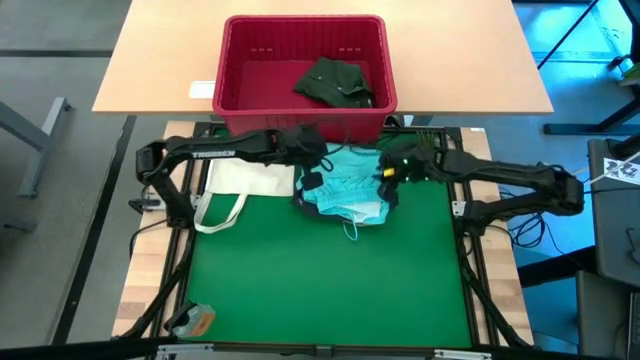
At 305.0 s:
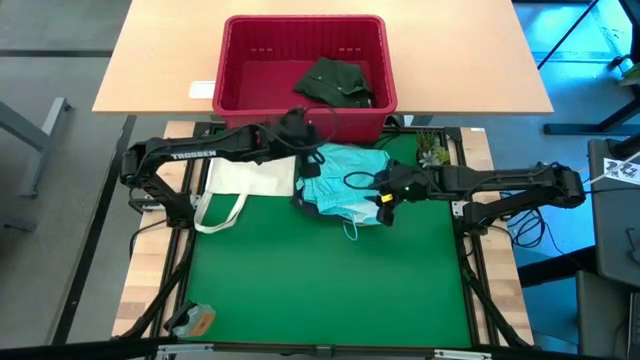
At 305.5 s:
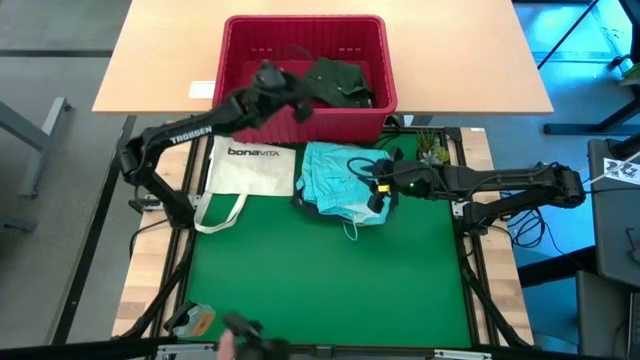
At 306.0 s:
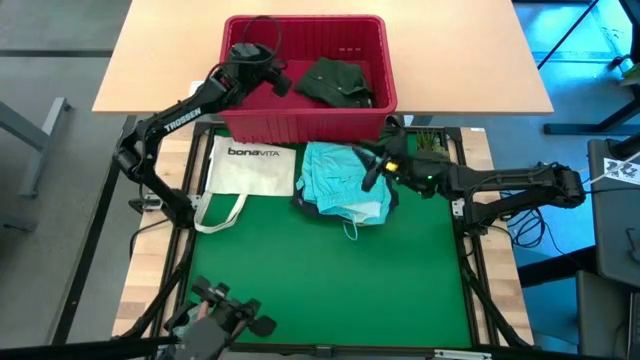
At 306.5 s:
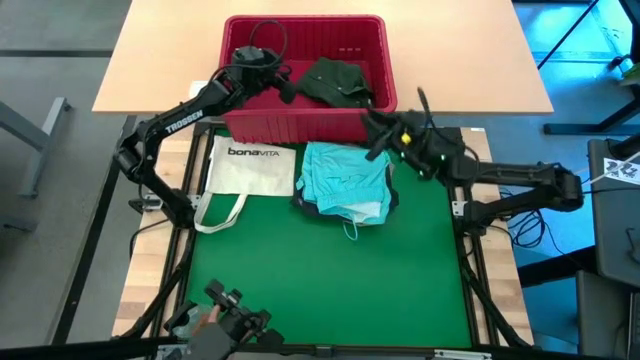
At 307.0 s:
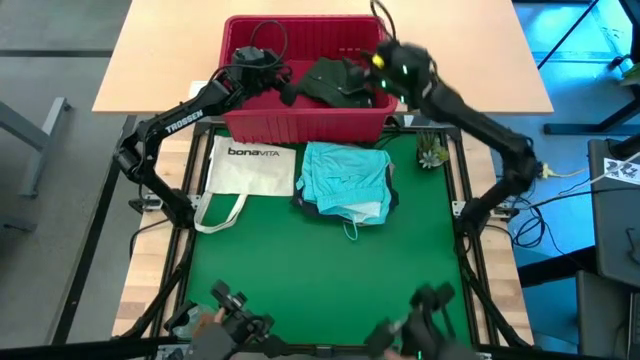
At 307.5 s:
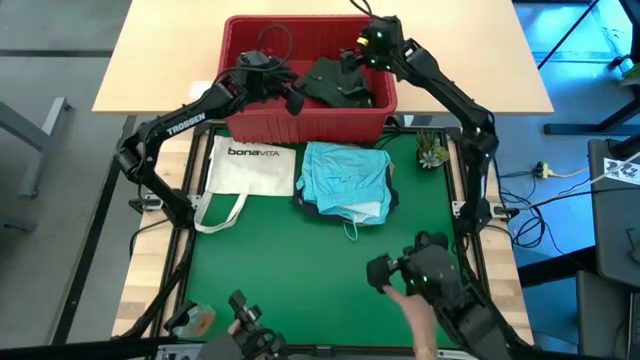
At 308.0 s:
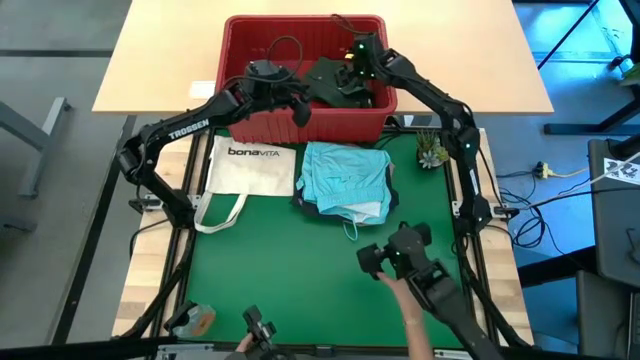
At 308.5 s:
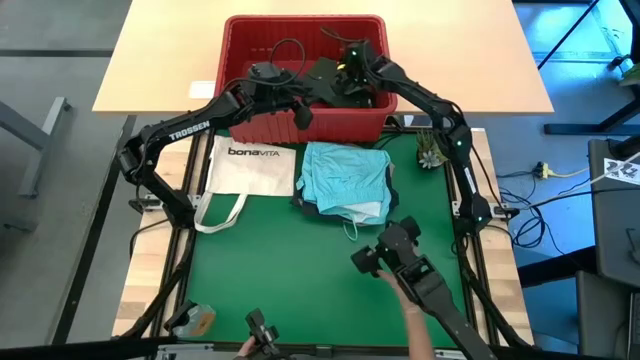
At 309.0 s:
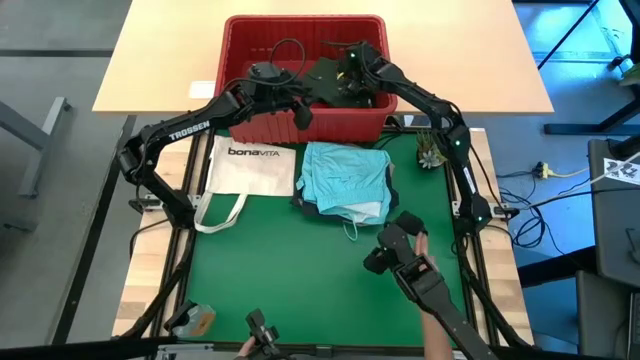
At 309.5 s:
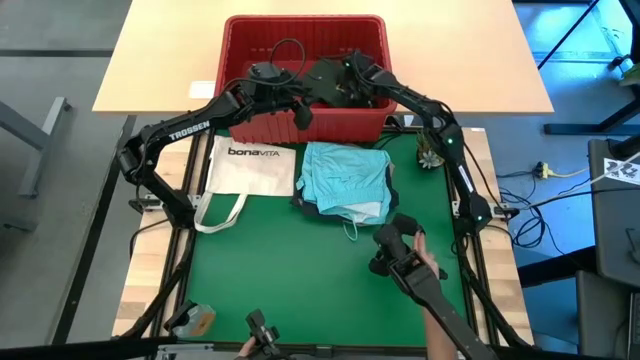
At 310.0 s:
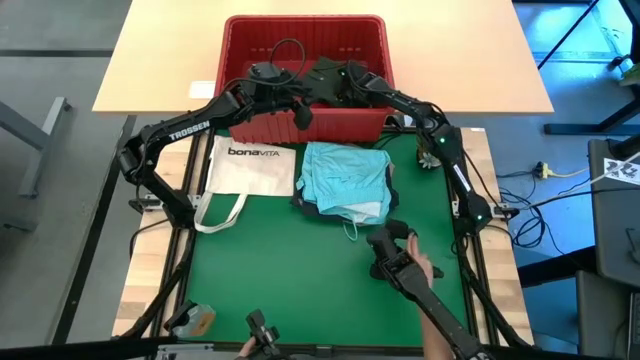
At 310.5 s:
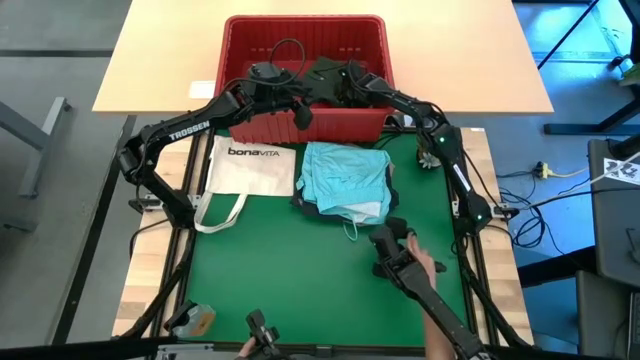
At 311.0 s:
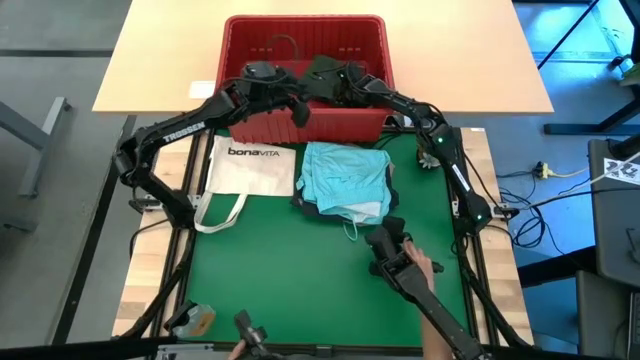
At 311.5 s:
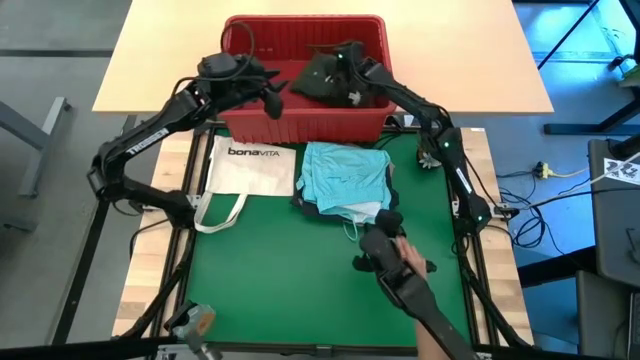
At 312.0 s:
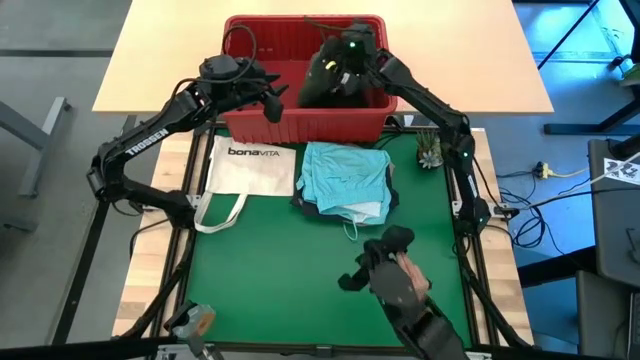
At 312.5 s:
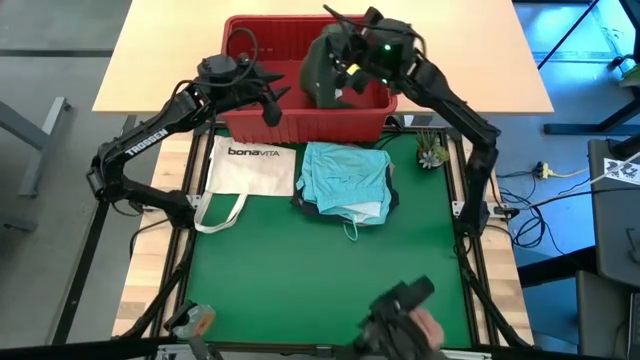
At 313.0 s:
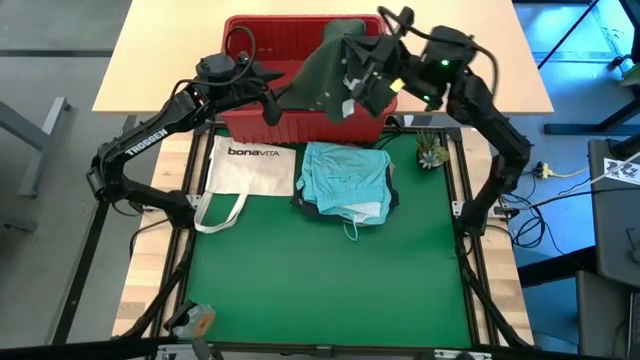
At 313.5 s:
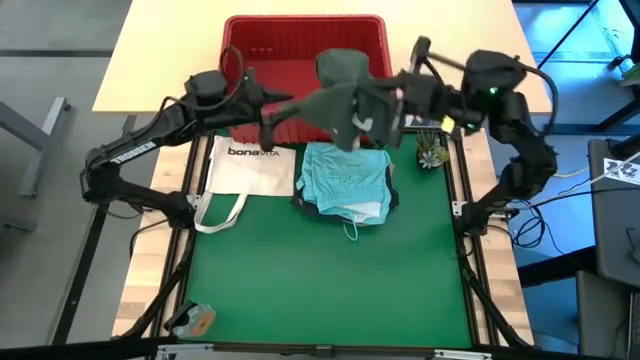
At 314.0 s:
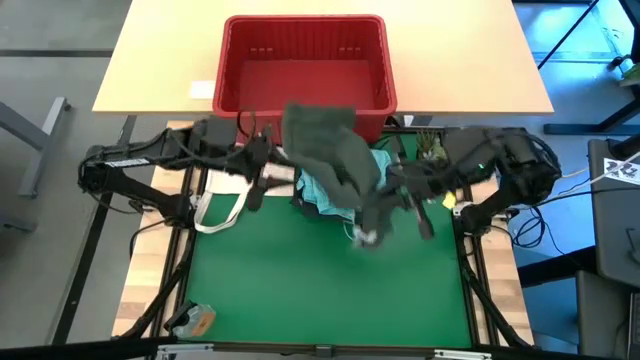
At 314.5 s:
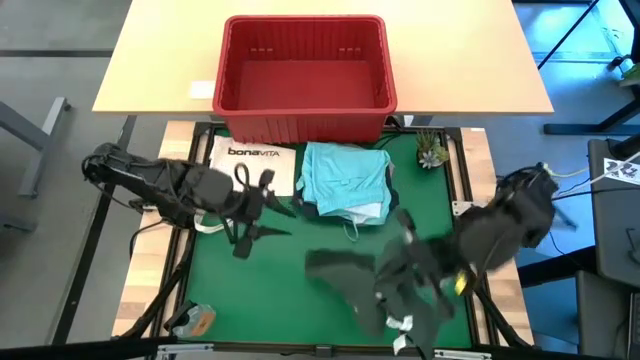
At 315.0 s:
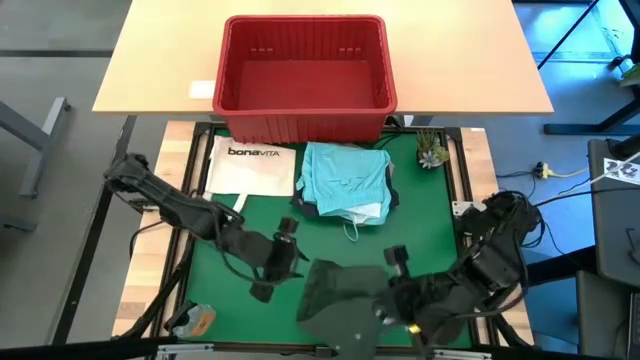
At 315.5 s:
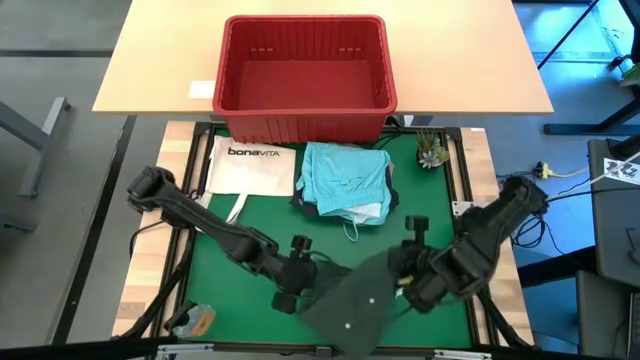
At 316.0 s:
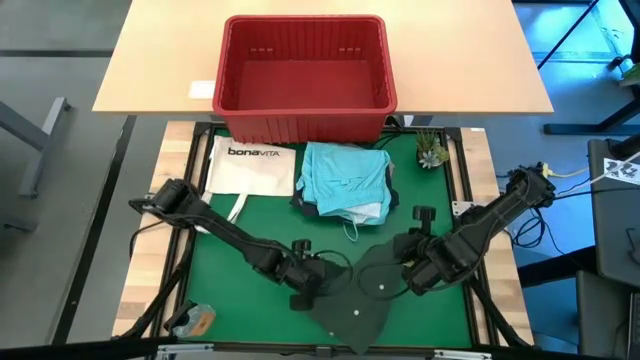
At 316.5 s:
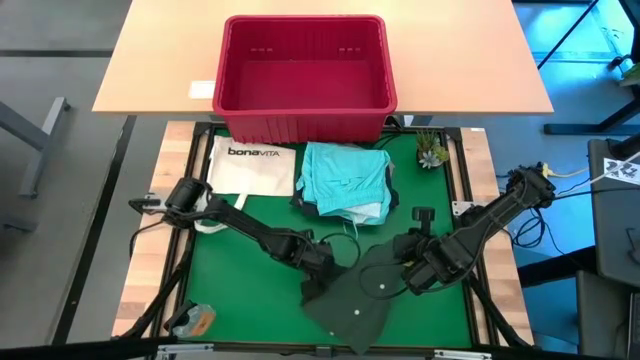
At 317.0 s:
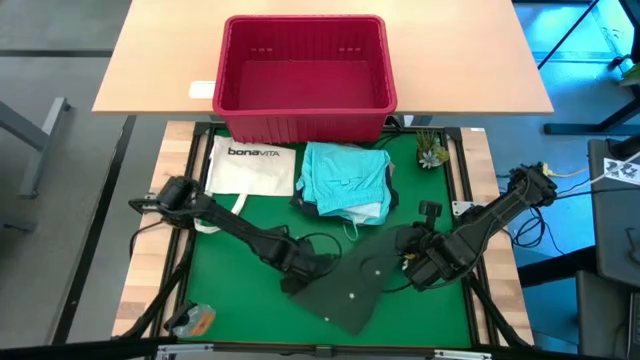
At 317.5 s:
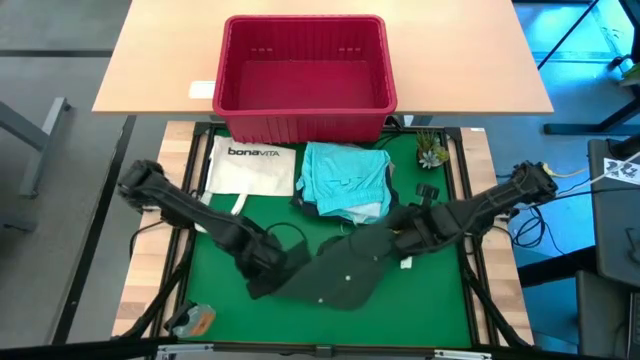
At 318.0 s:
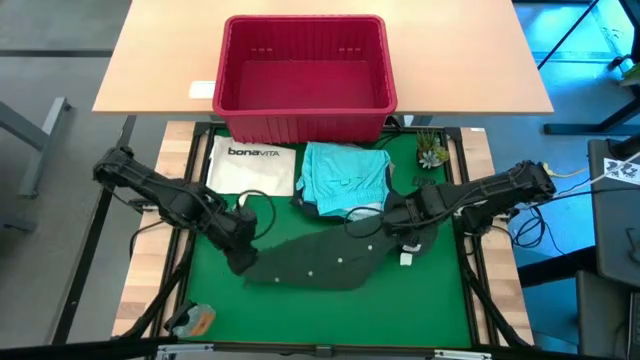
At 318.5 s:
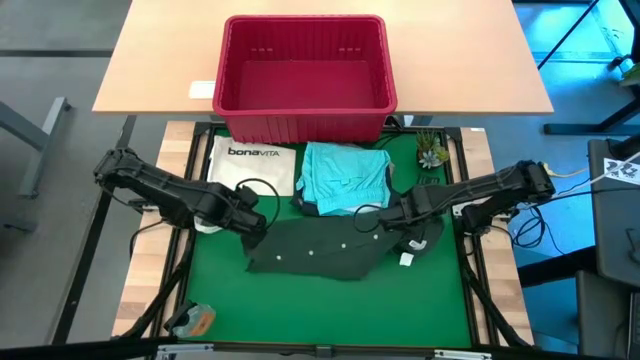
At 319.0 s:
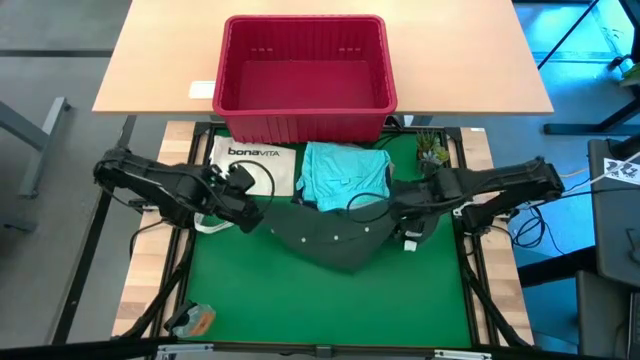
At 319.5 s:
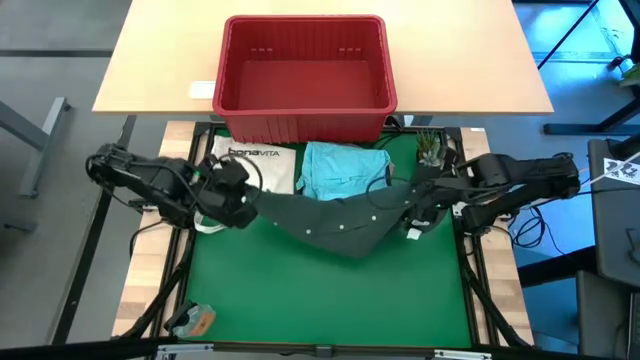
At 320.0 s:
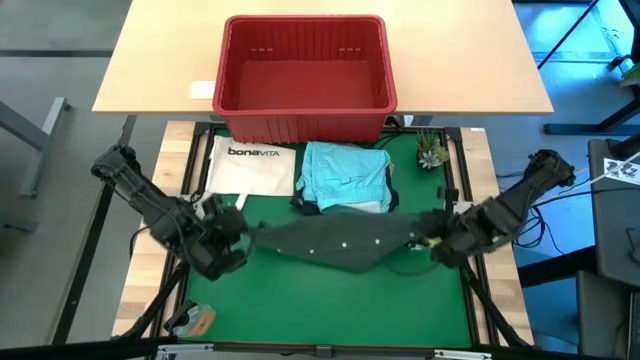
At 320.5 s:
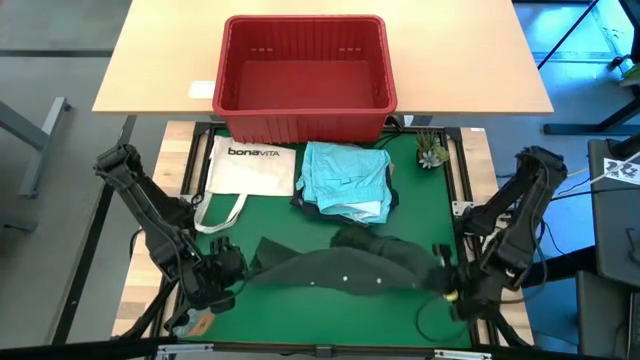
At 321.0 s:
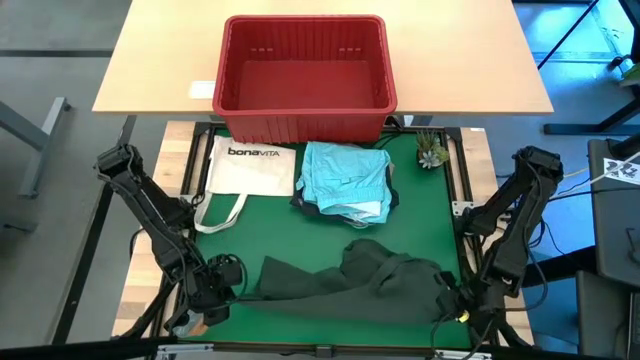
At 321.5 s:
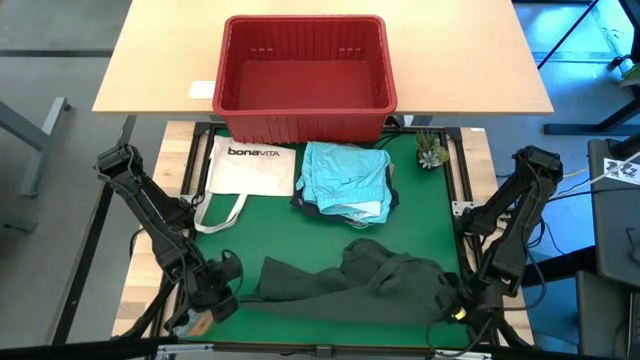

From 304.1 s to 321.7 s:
Task: Fold Laundry from Bin
Remove the green polo shirt from the red laundry bin

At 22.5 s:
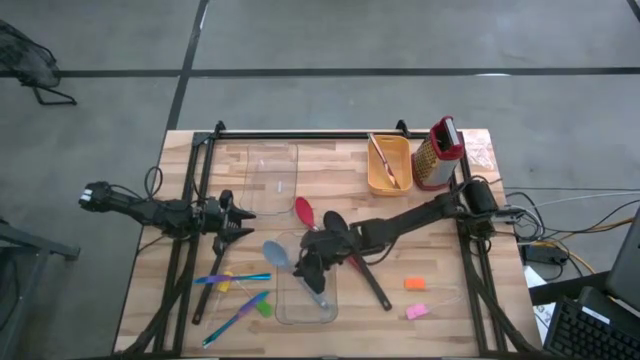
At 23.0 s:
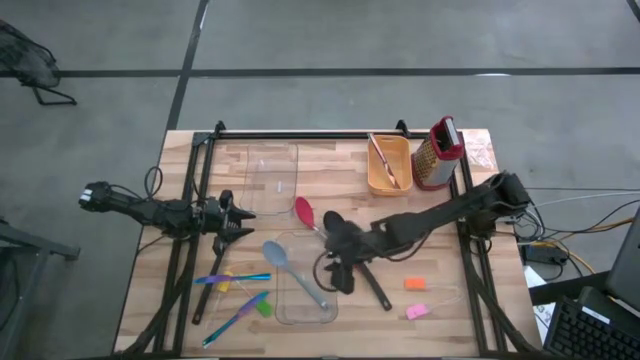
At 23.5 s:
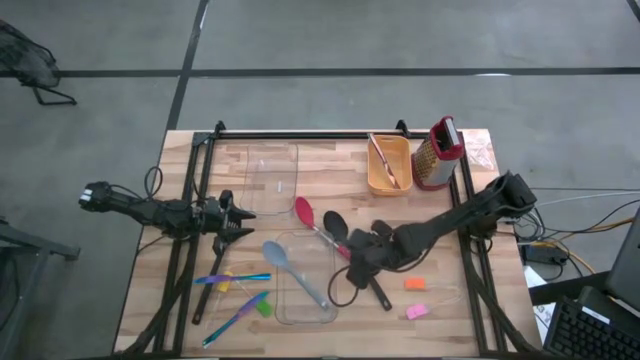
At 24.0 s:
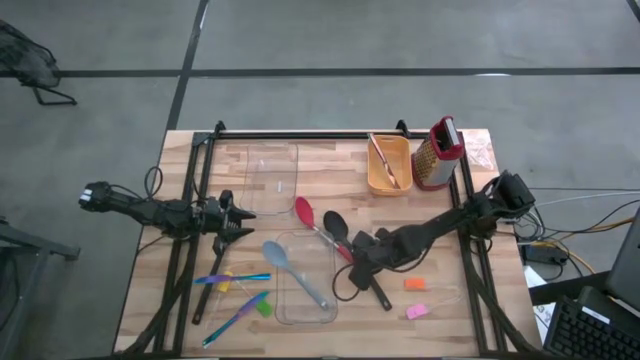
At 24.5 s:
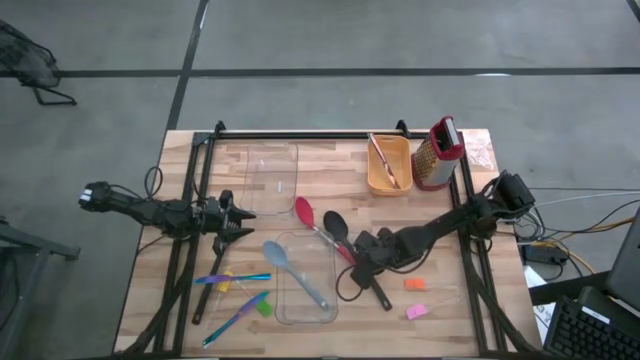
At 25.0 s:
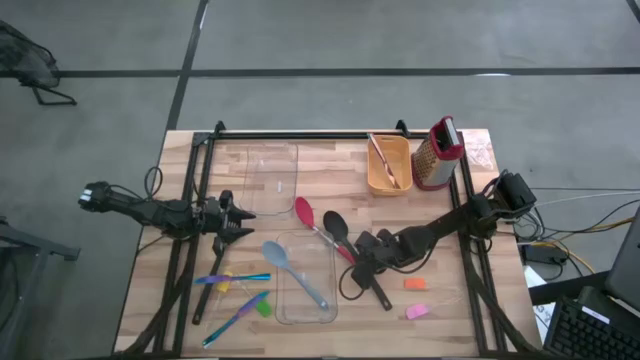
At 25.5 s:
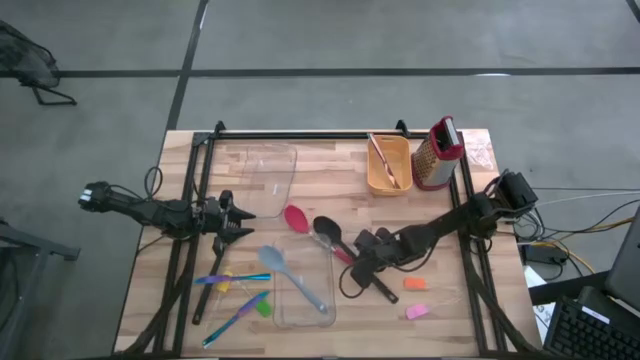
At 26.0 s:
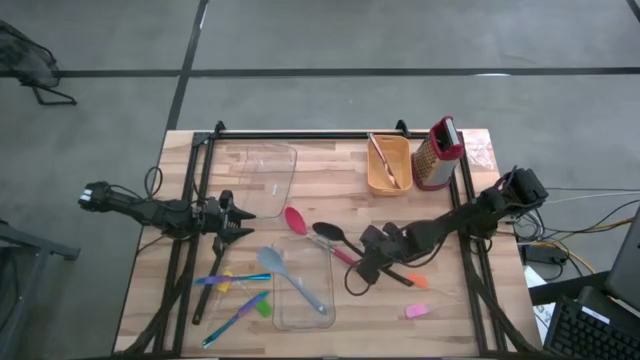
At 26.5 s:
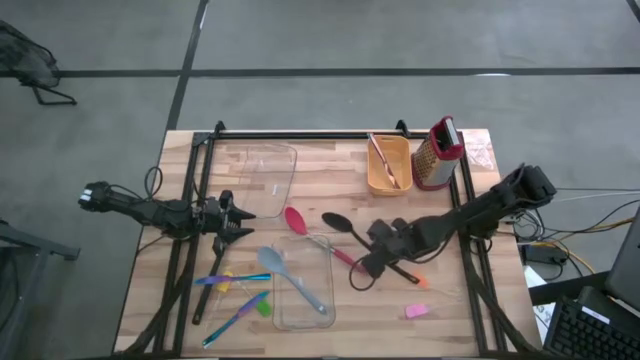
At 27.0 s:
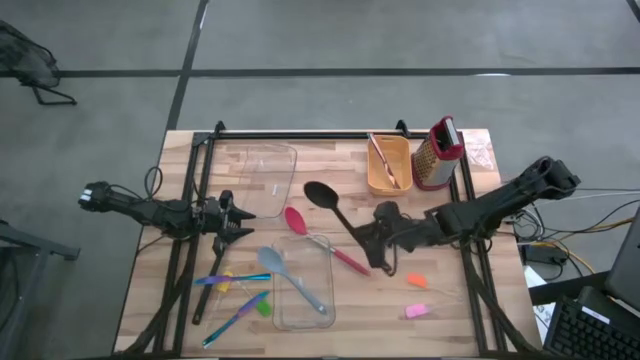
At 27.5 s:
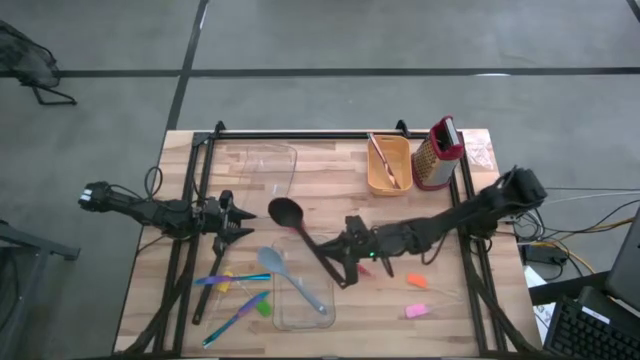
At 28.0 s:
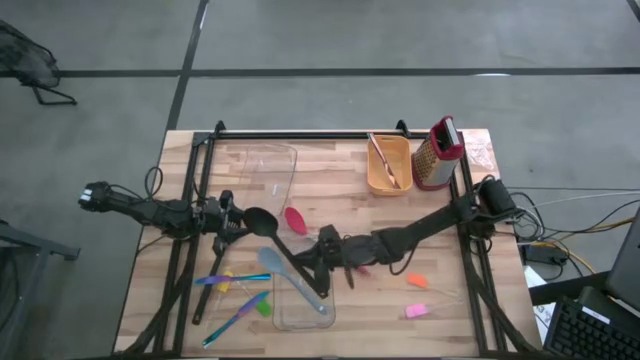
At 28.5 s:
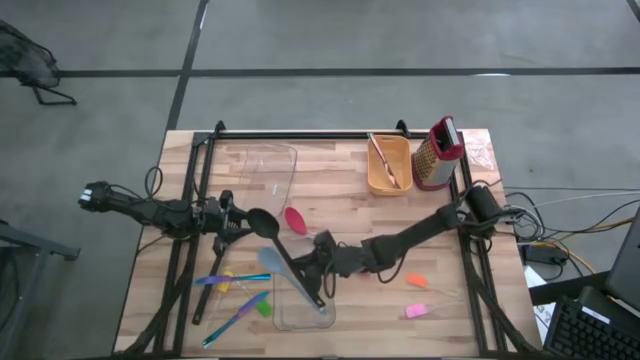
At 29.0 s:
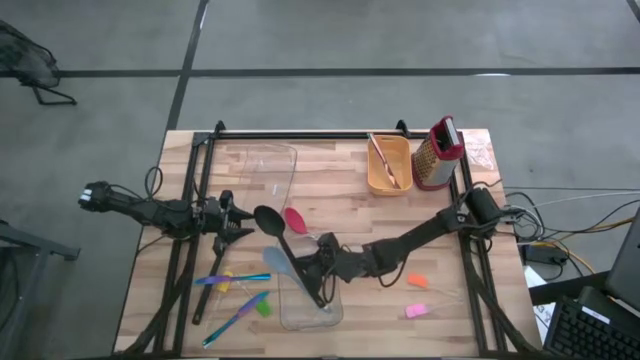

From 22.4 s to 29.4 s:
Task: Pick & Place Kitchen Items
Put the right black serving spoon into the bottom transparent bin
